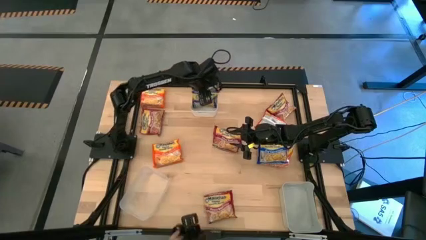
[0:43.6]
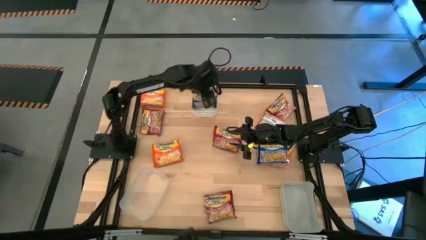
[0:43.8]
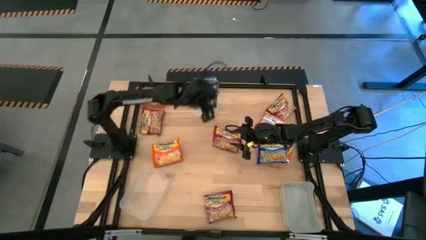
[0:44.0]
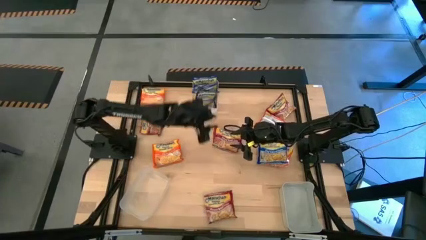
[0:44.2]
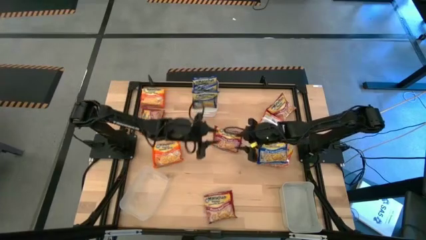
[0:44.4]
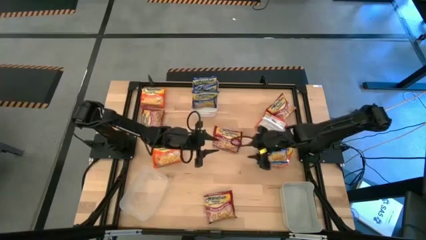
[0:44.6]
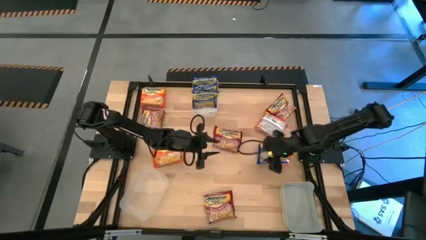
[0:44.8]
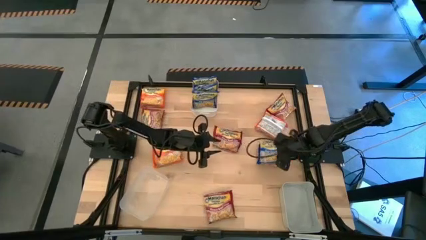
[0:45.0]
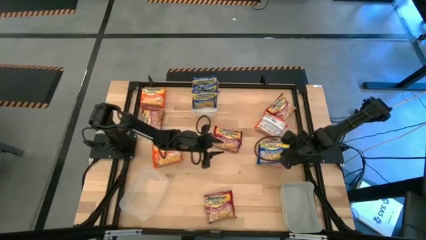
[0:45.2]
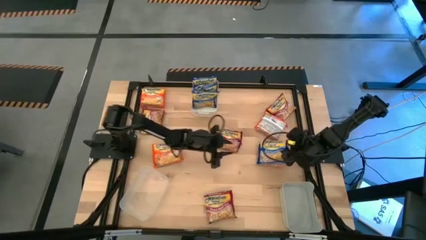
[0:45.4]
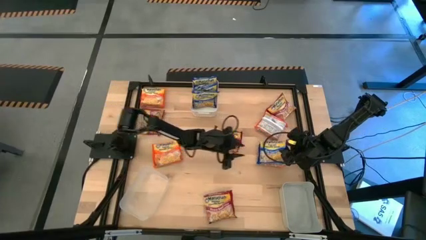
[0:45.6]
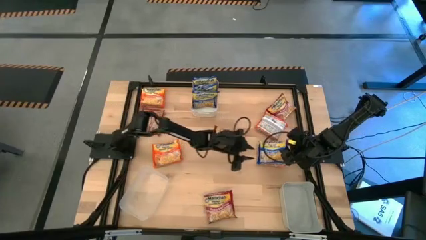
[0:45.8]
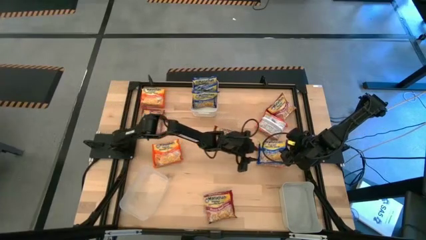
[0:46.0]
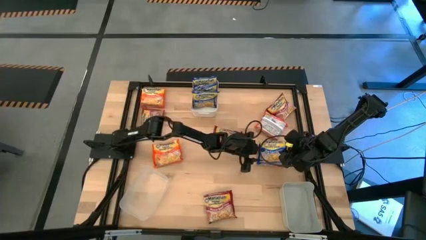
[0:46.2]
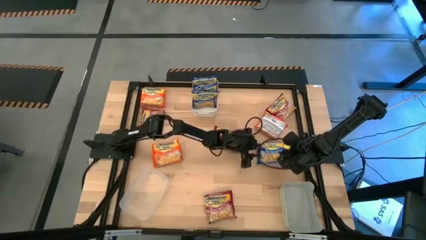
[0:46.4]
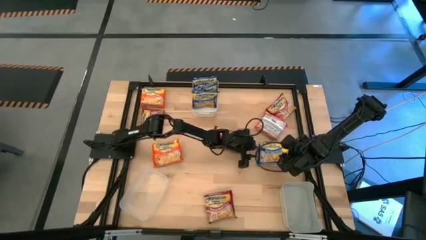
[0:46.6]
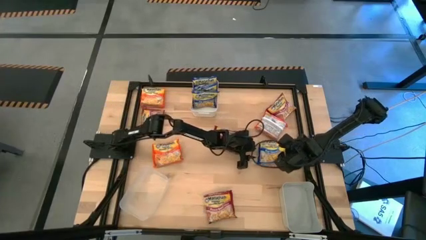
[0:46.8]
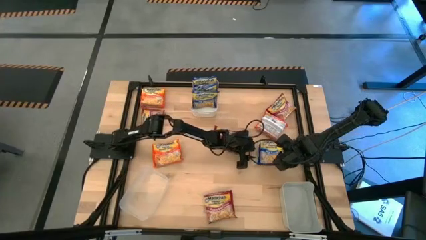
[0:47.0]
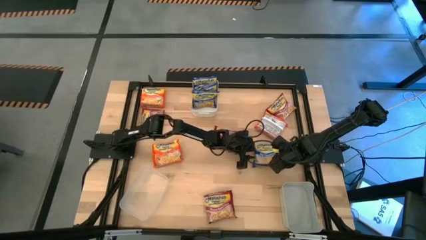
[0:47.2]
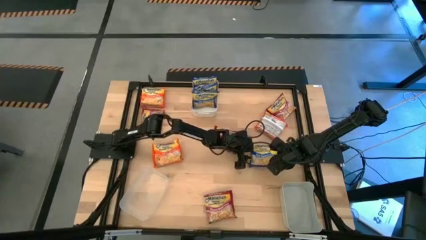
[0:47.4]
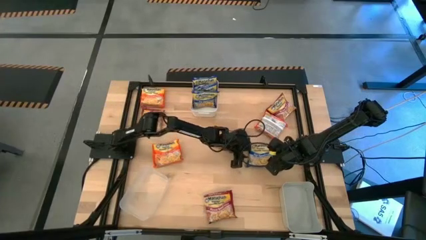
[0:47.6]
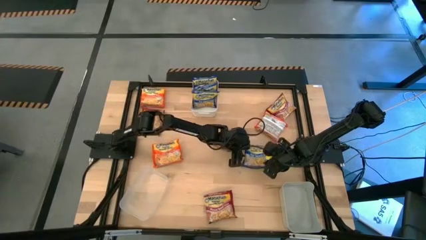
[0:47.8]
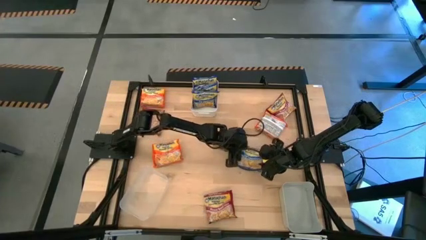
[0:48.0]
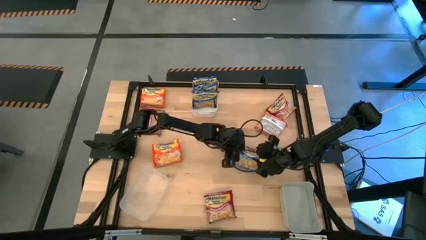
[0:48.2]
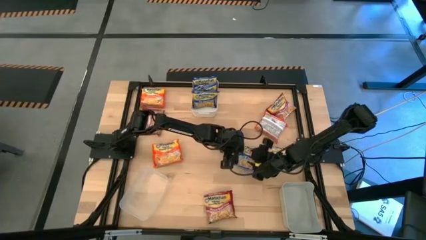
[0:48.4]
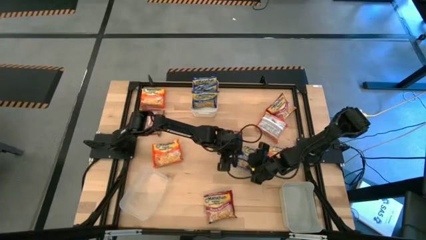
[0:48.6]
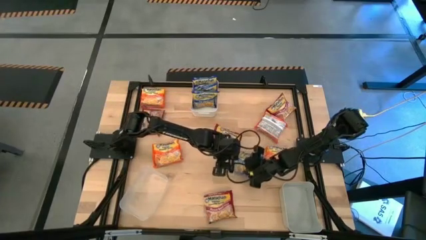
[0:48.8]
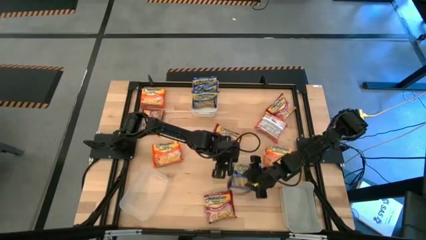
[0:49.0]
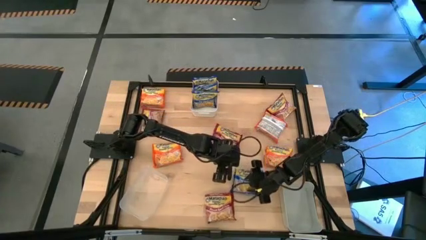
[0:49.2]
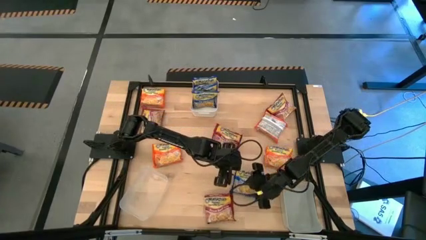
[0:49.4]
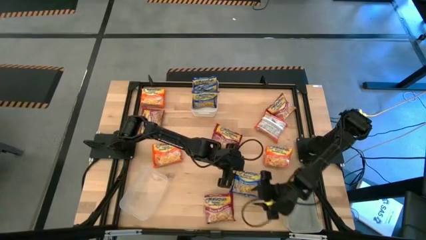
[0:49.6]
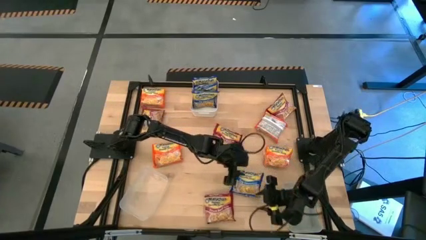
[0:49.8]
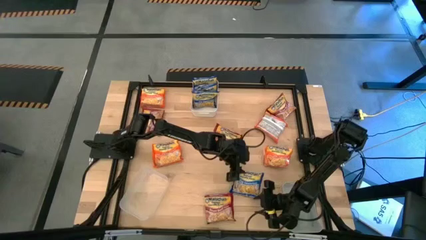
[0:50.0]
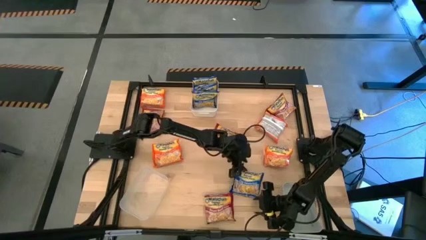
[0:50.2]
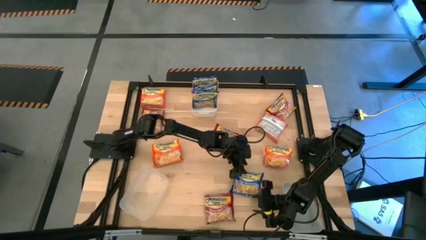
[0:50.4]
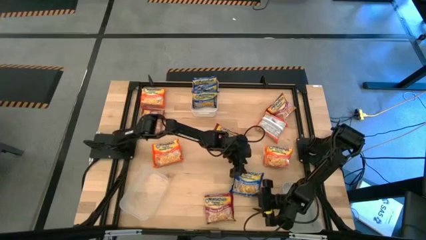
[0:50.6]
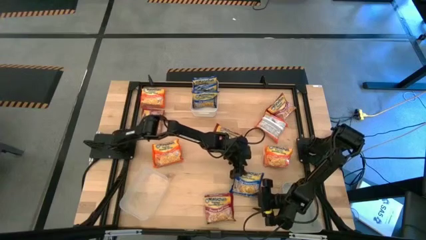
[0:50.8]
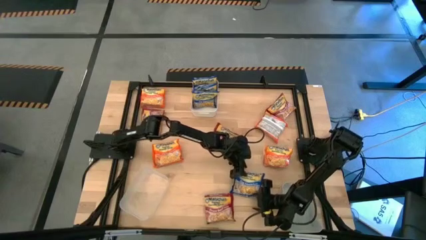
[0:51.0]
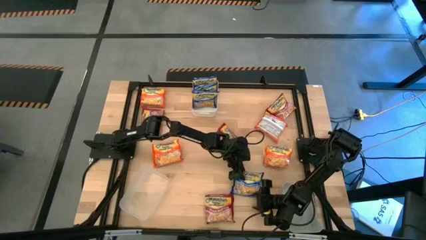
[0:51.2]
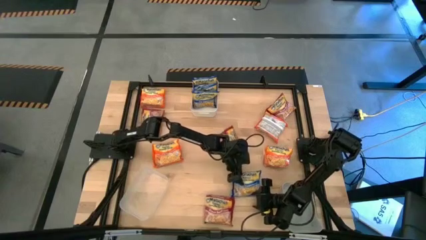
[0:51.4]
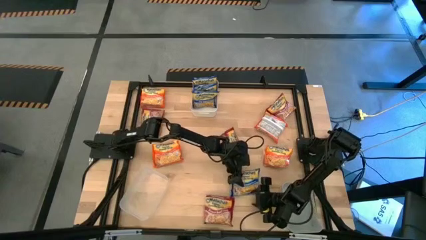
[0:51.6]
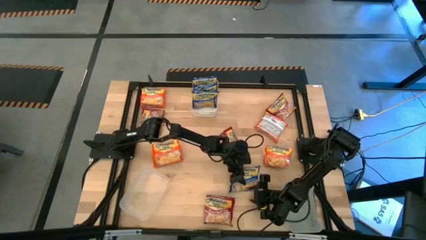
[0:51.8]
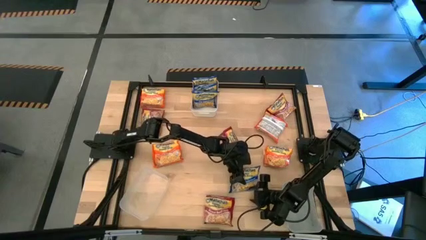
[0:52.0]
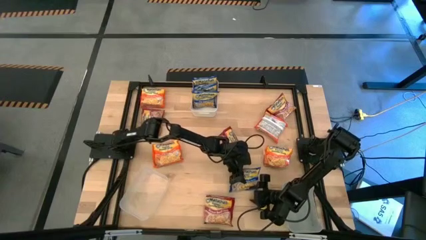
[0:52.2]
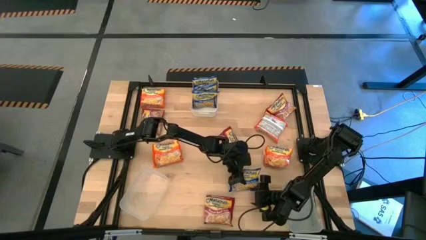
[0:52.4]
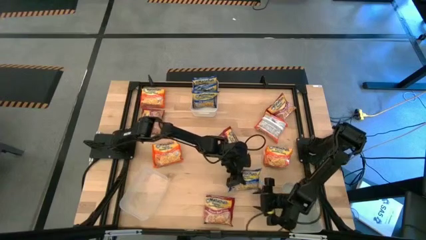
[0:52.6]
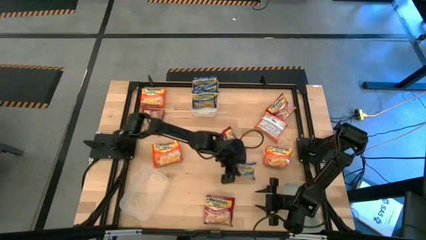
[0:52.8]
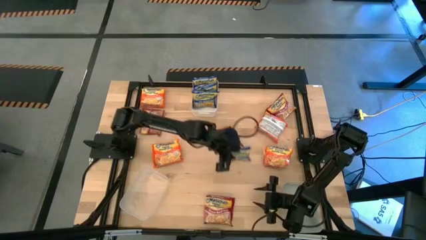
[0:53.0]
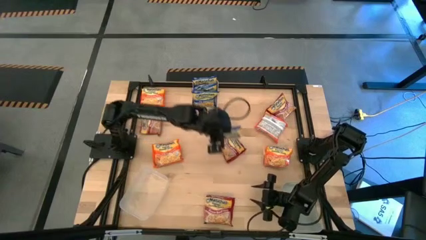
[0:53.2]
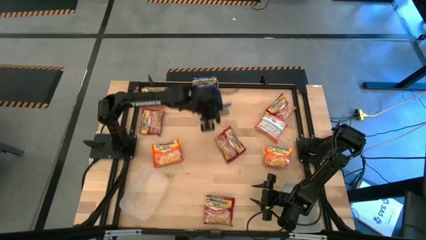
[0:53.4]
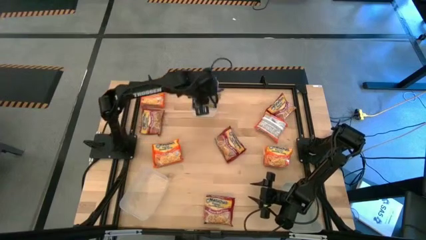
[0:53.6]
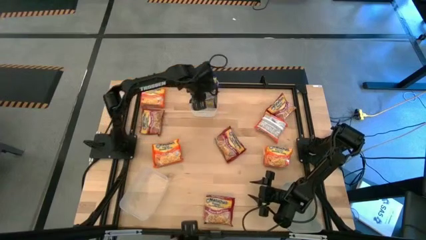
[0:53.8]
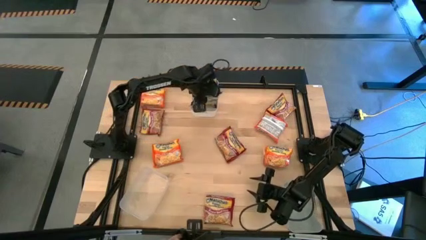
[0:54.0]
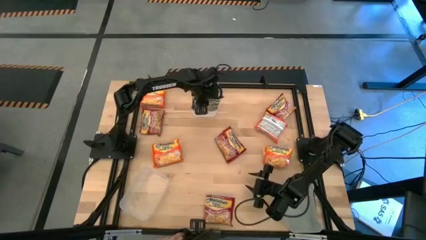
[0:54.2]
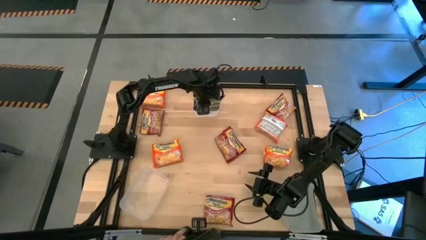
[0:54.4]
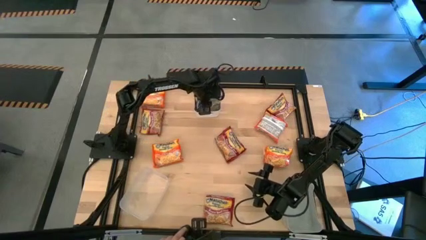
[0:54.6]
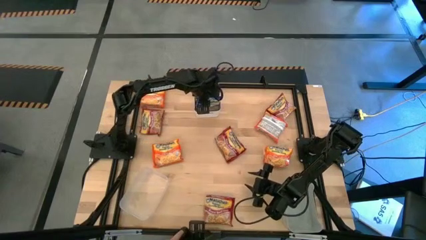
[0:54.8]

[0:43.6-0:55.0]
Task: Sort Maruchan noodles
Put the blue noodle pack into the white bin
